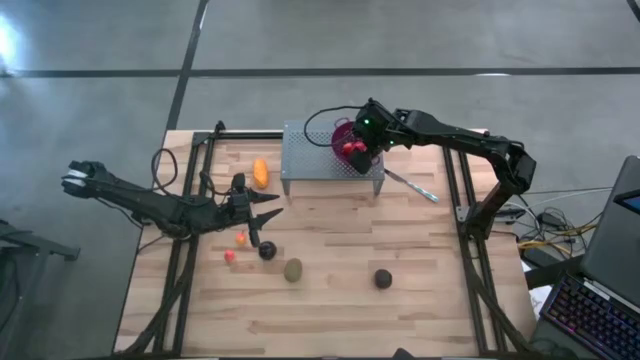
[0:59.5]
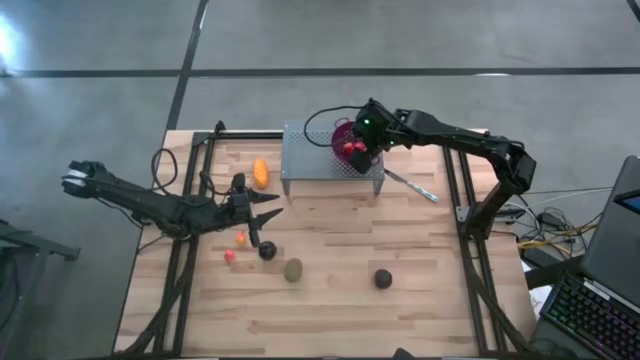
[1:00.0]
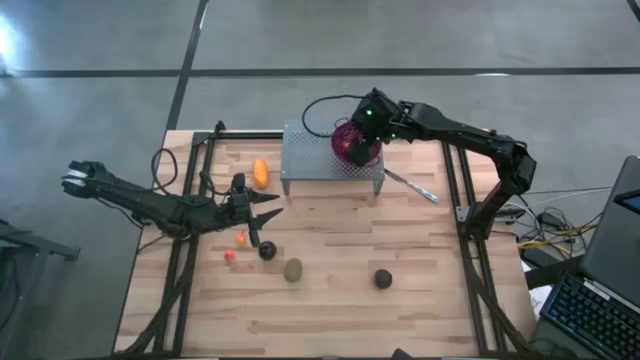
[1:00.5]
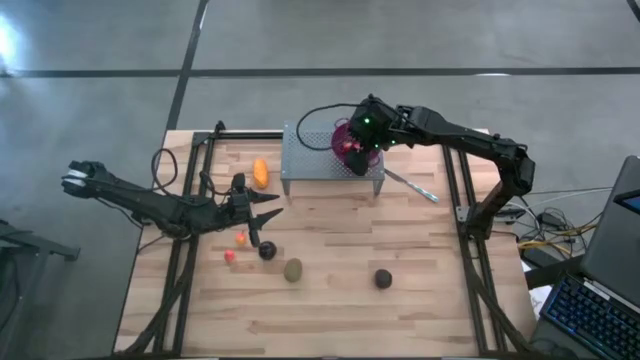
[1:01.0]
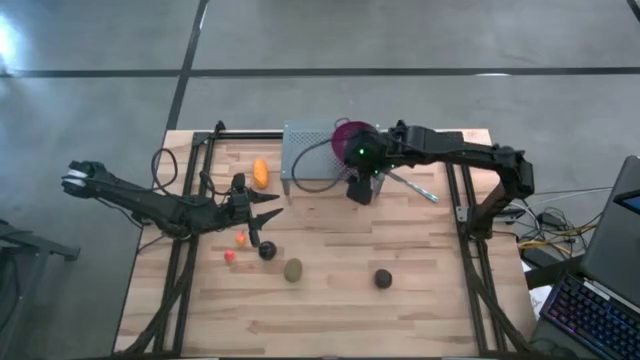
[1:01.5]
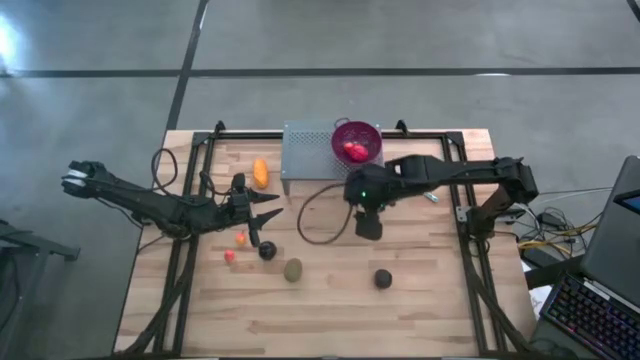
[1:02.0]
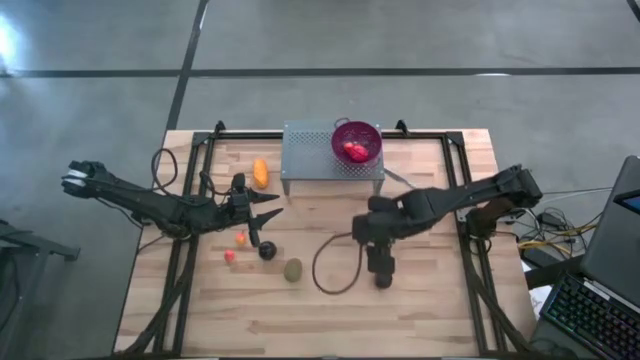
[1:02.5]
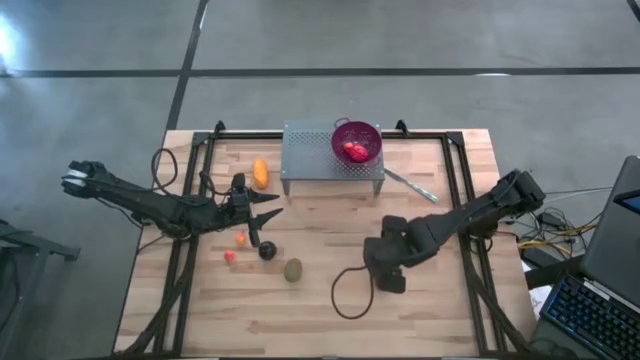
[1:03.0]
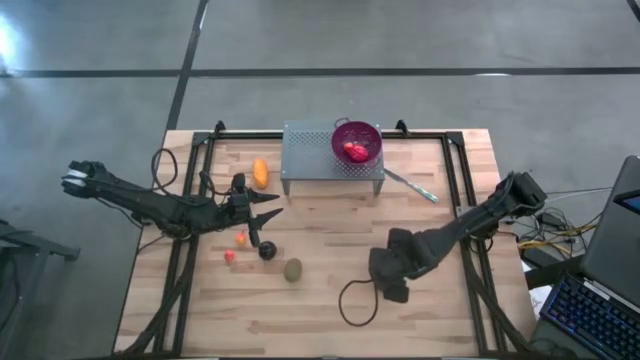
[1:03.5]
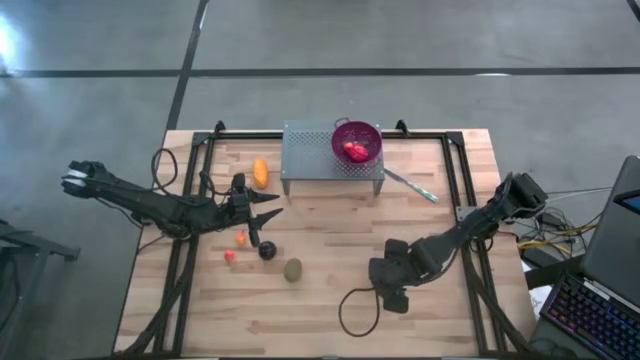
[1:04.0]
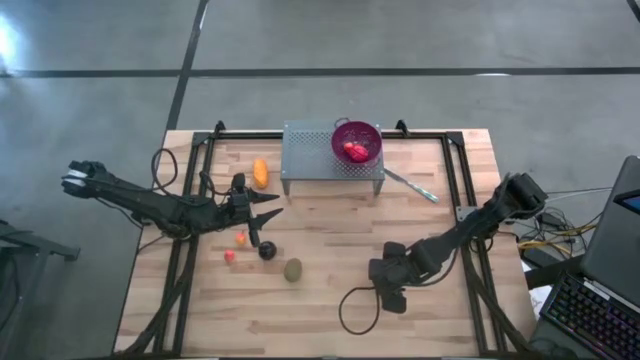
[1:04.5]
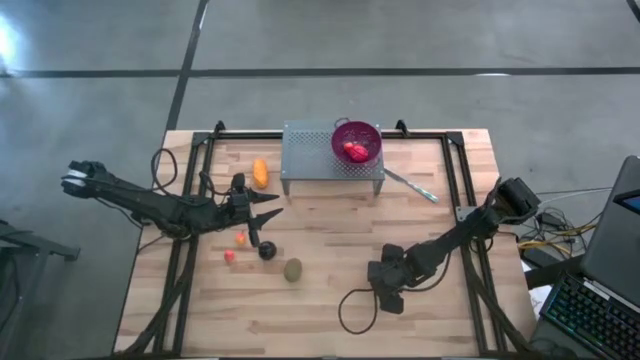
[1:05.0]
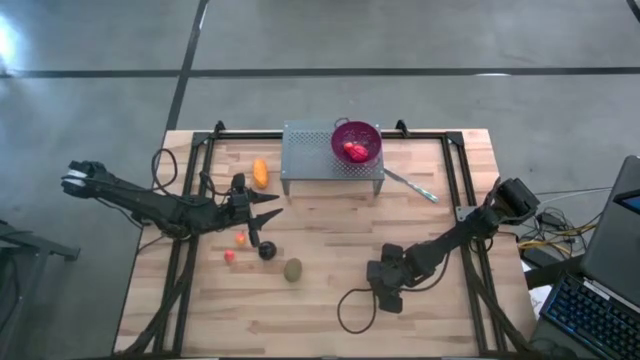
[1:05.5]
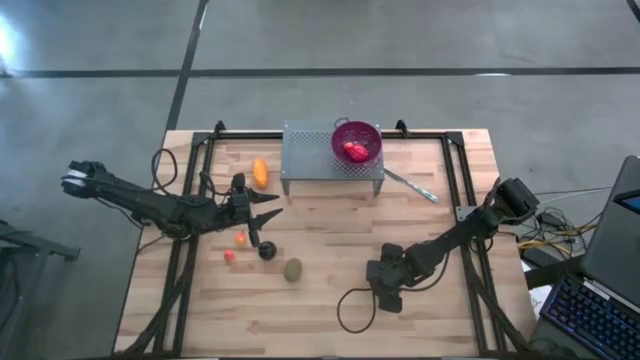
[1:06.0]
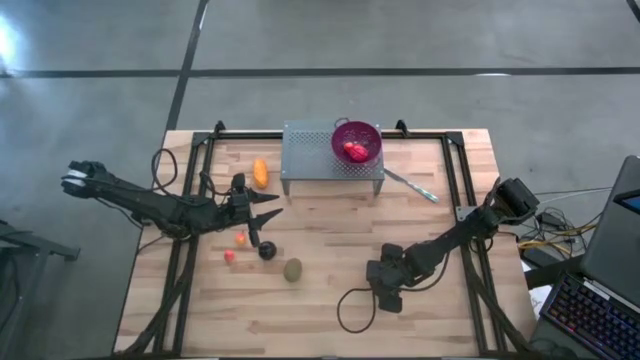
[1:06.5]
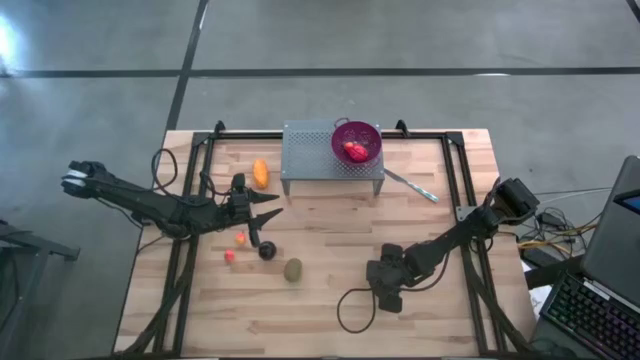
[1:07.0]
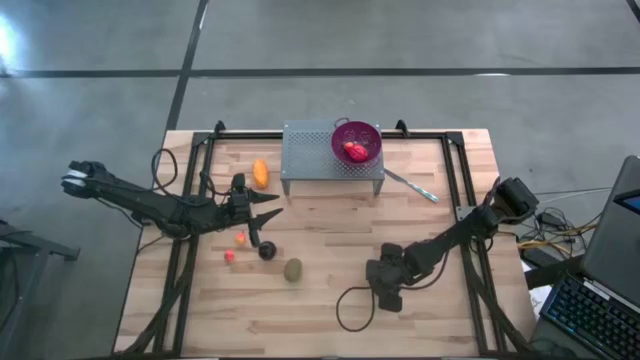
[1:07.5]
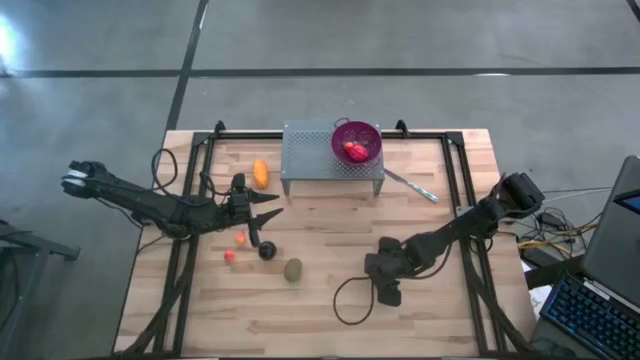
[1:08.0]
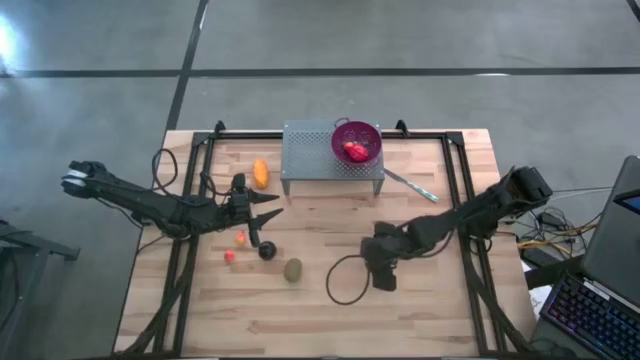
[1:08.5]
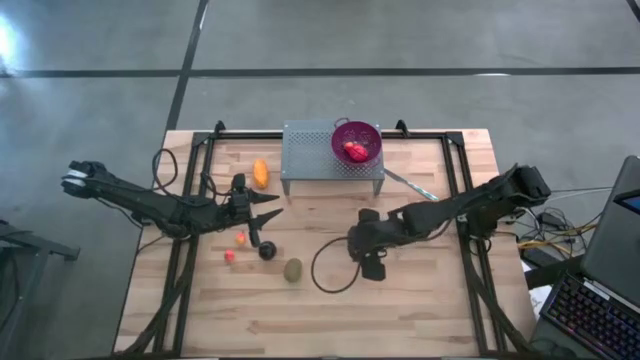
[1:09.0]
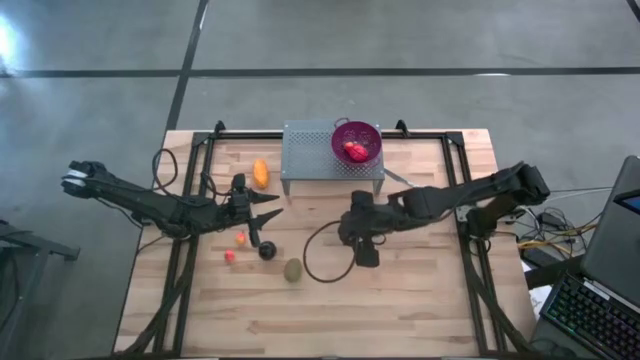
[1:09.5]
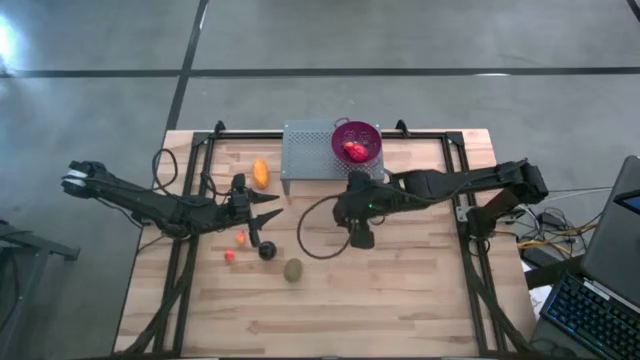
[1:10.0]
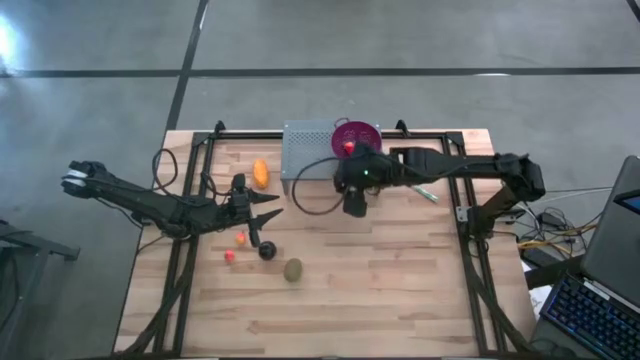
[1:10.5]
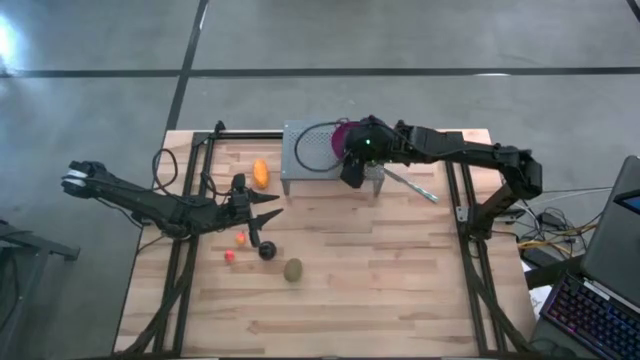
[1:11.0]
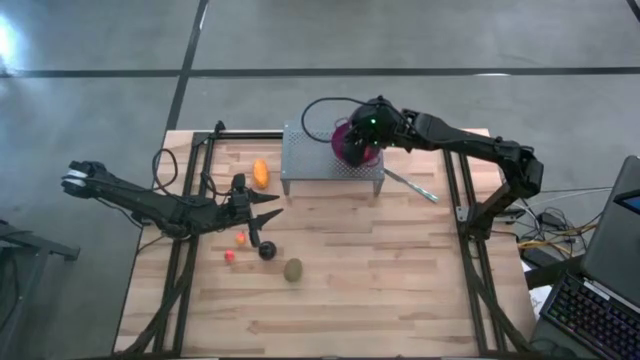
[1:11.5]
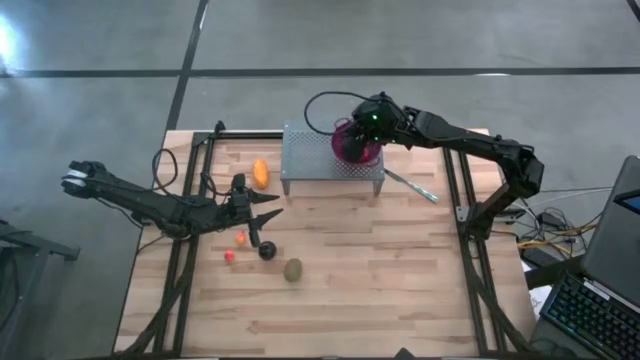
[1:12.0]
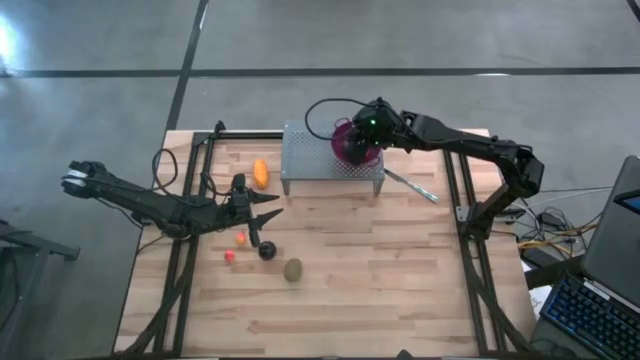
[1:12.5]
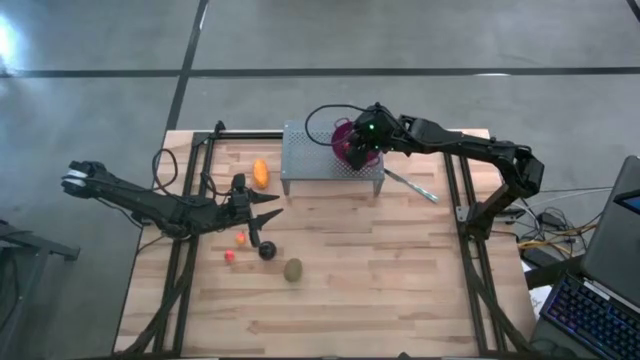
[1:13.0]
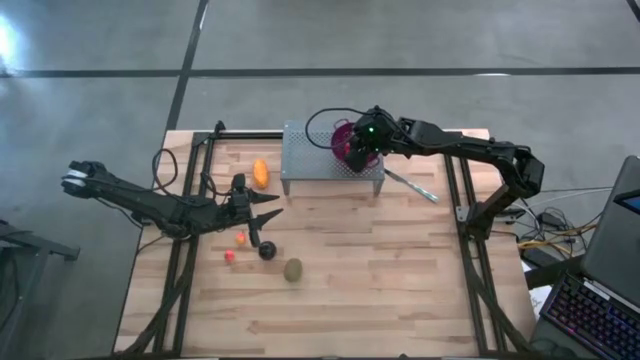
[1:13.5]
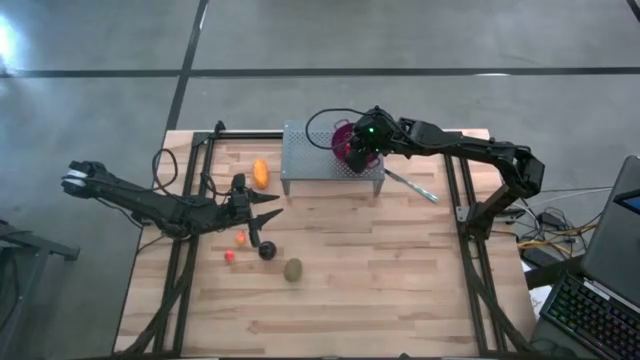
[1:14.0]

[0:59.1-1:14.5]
Task: Pick & Place Fruit
Put the plum into the purple strainer bowl on the shelf

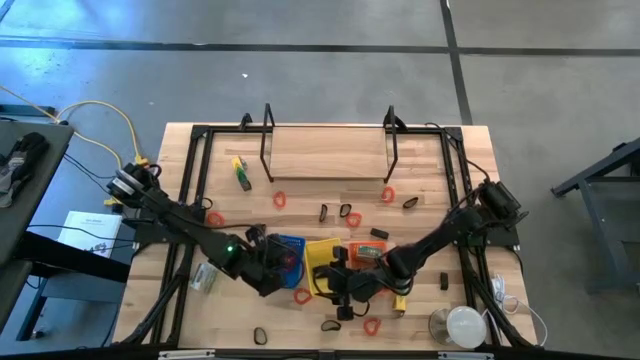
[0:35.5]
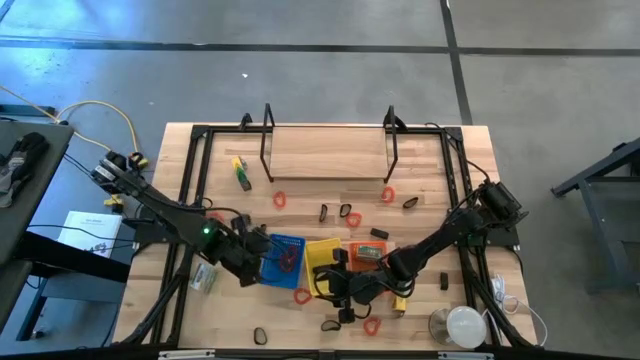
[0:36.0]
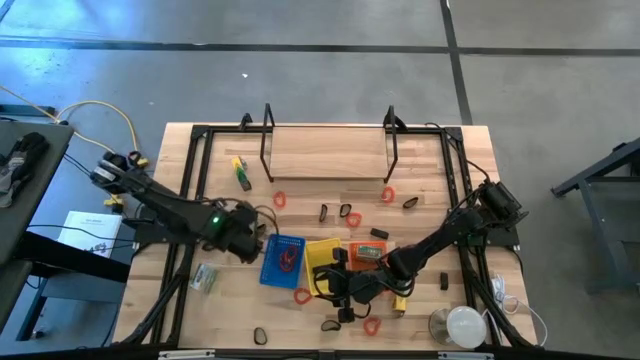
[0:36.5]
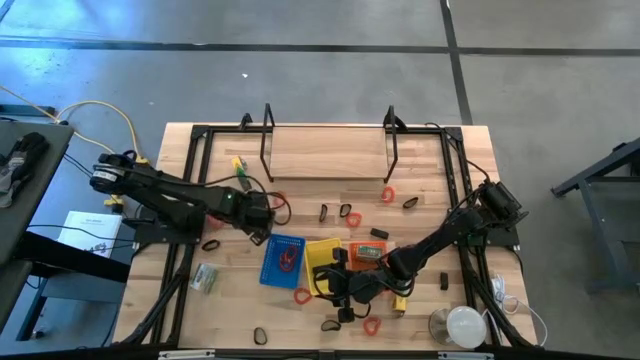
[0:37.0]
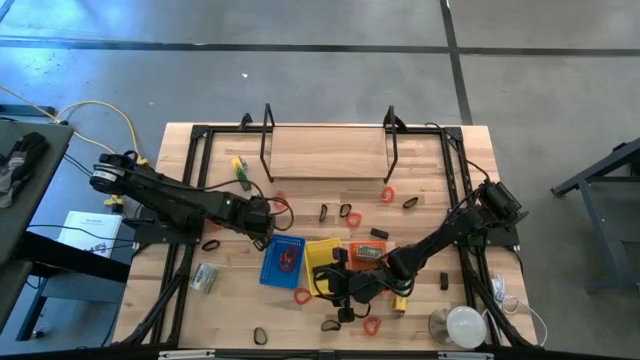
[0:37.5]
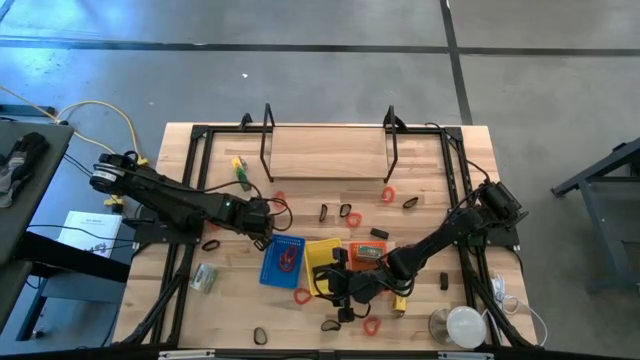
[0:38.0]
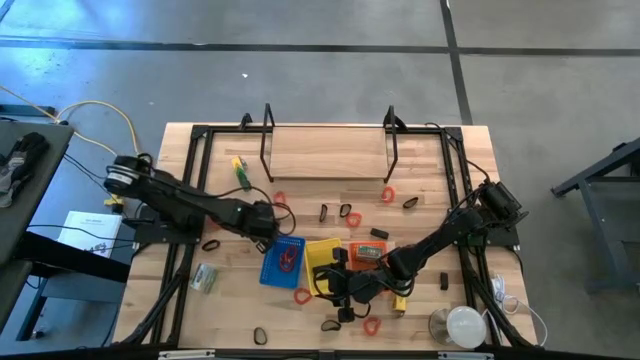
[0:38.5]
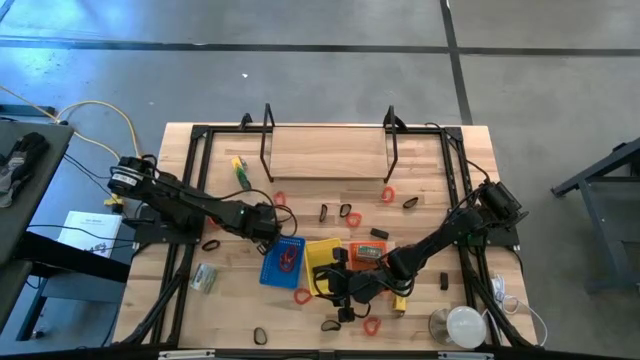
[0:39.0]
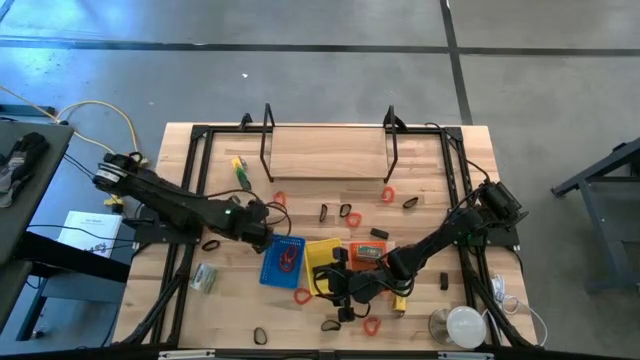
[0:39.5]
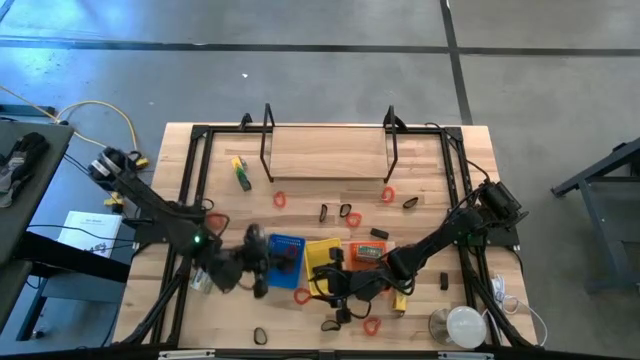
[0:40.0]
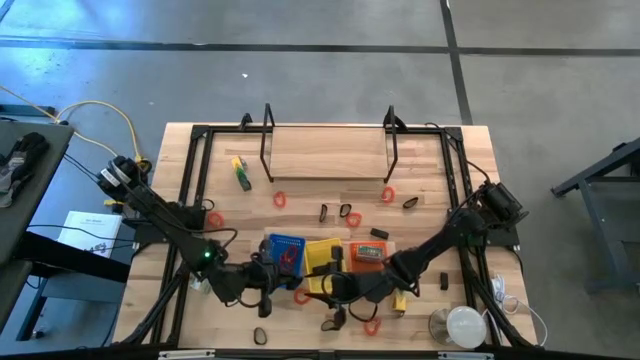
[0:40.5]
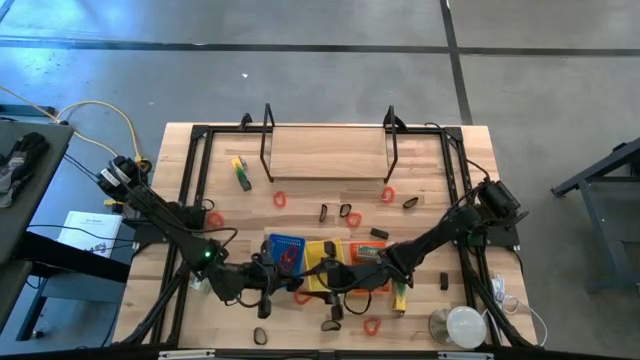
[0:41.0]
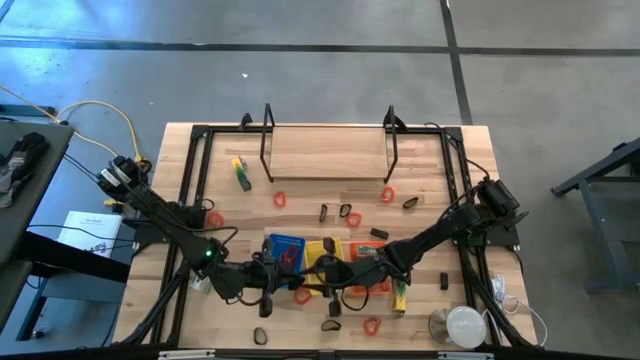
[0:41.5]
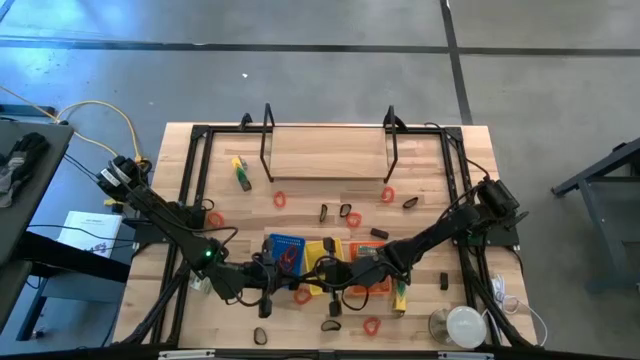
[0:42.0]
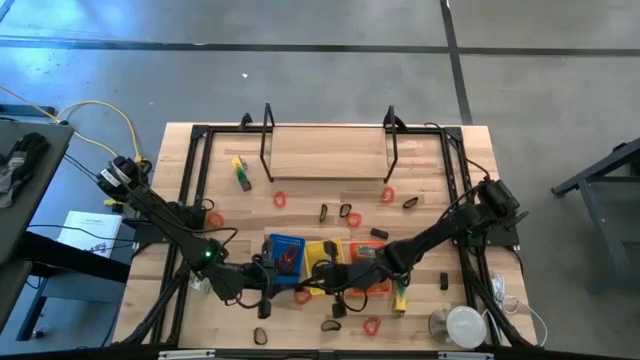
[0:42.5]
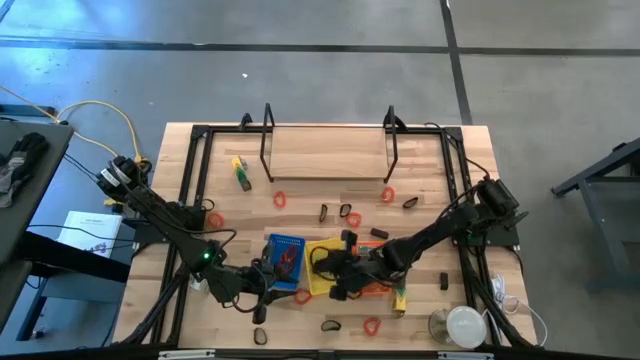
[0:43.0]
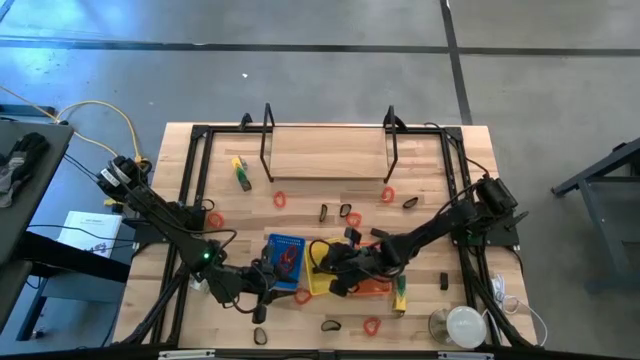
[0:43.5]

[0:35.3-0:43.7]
Task: Pick & Place Office Desk Supplies
Put the black rubber band into the yellow basket
